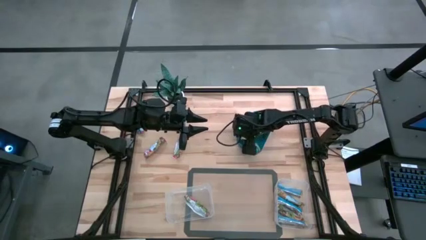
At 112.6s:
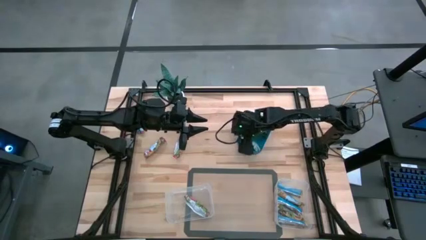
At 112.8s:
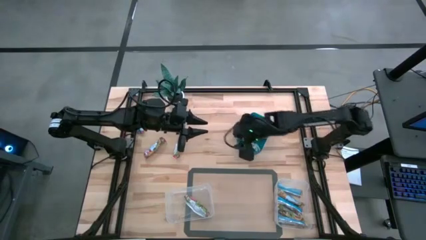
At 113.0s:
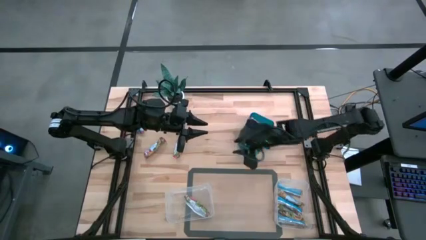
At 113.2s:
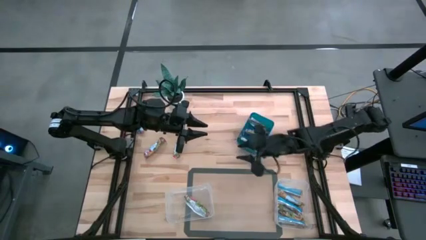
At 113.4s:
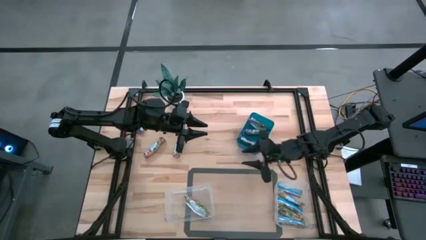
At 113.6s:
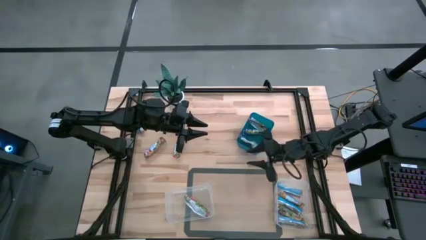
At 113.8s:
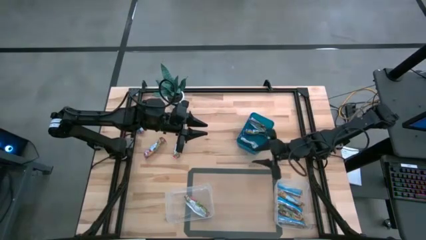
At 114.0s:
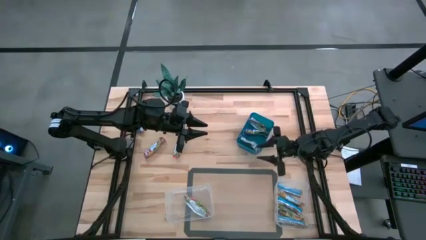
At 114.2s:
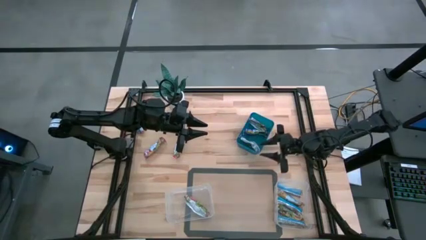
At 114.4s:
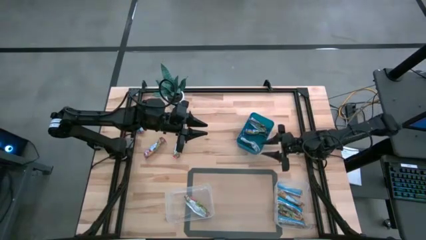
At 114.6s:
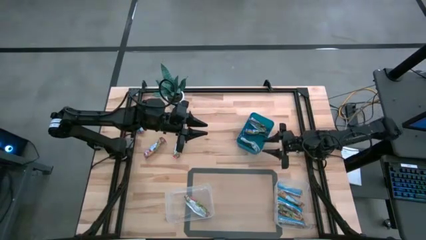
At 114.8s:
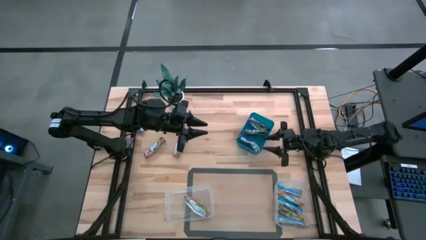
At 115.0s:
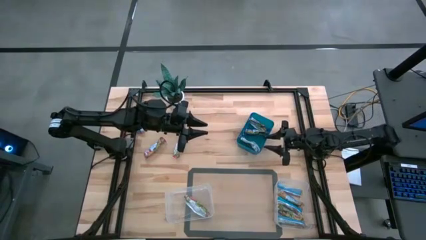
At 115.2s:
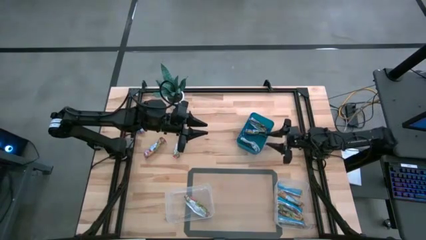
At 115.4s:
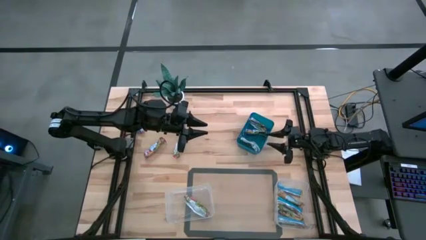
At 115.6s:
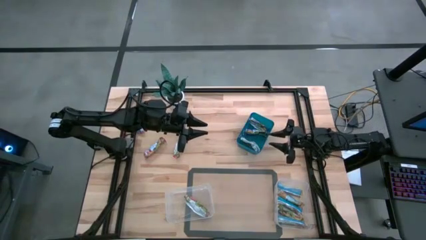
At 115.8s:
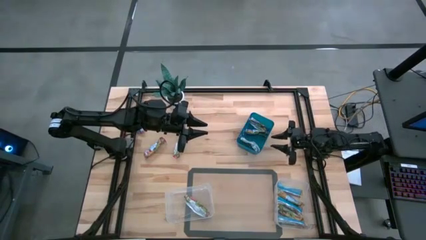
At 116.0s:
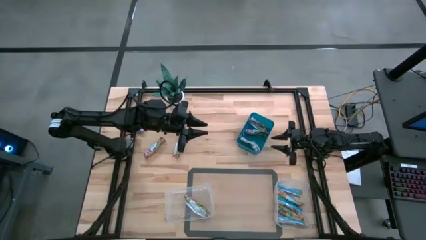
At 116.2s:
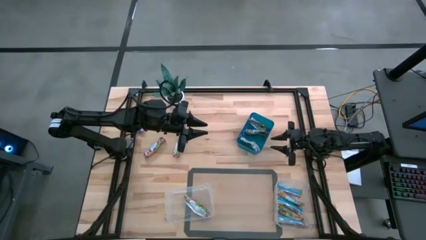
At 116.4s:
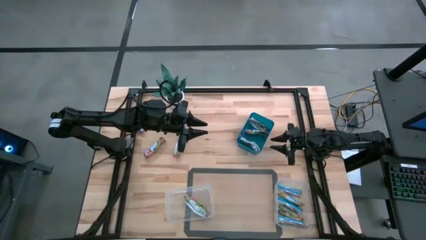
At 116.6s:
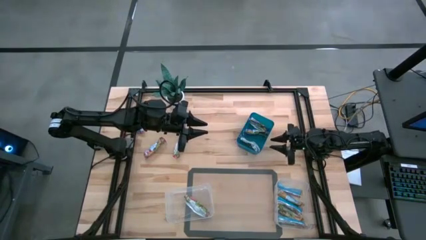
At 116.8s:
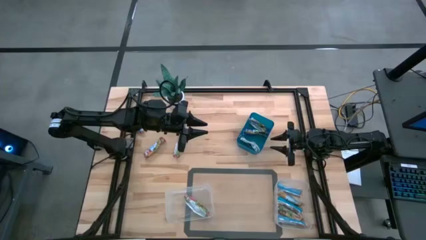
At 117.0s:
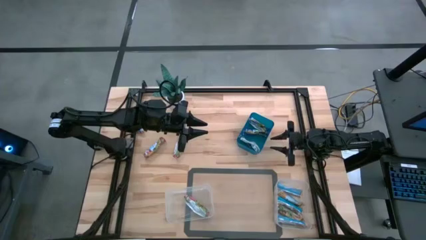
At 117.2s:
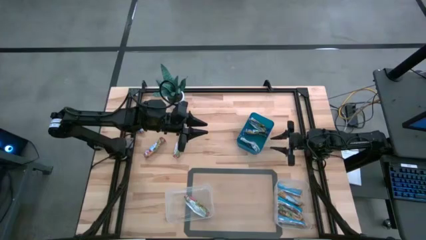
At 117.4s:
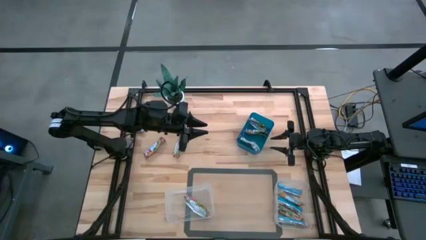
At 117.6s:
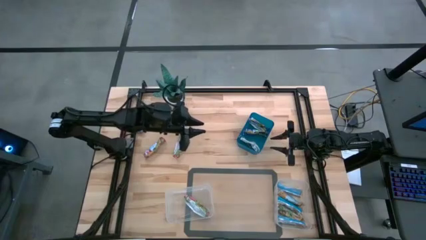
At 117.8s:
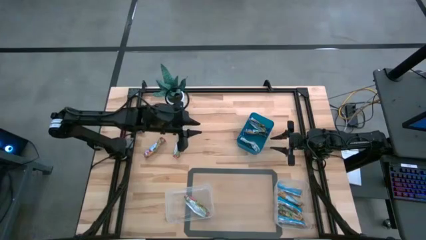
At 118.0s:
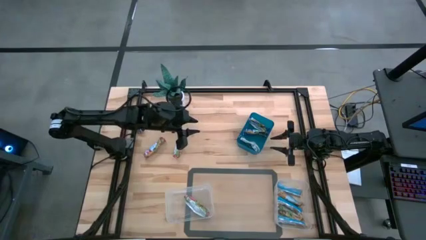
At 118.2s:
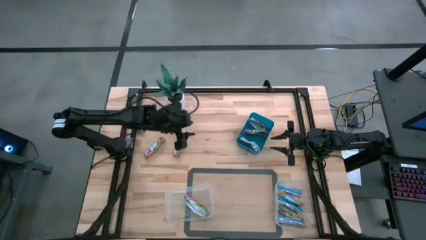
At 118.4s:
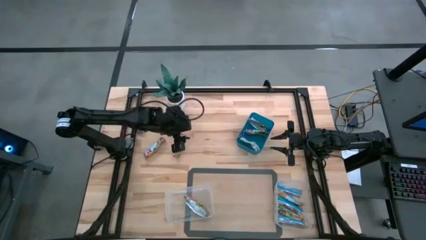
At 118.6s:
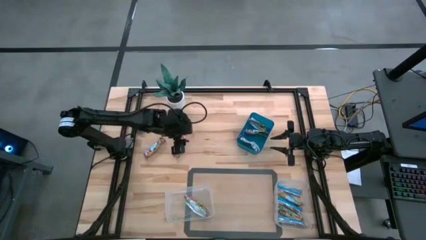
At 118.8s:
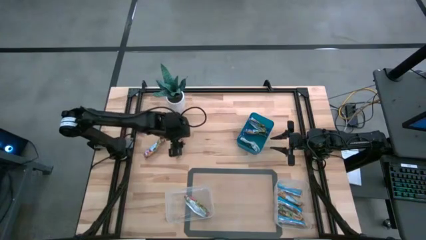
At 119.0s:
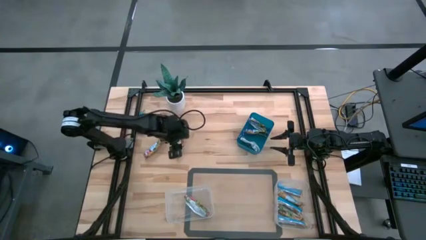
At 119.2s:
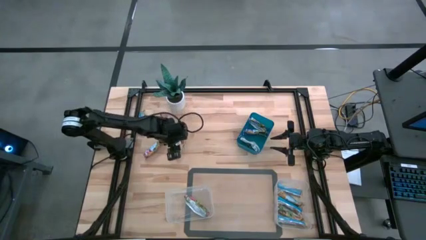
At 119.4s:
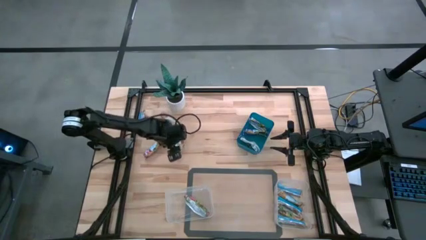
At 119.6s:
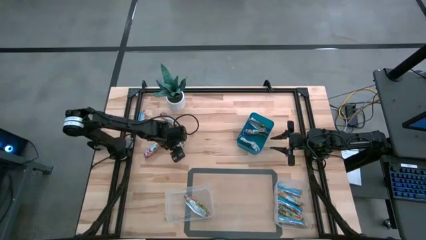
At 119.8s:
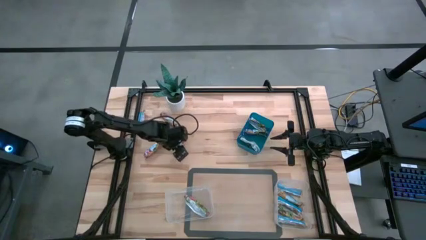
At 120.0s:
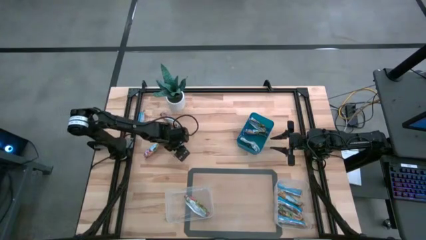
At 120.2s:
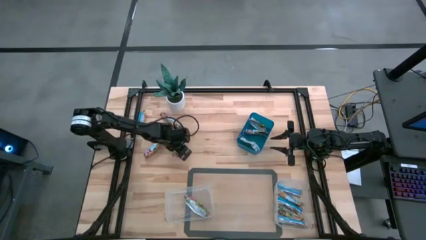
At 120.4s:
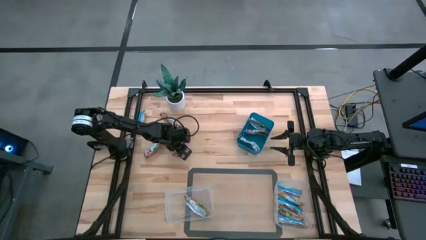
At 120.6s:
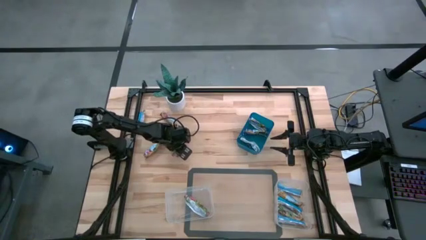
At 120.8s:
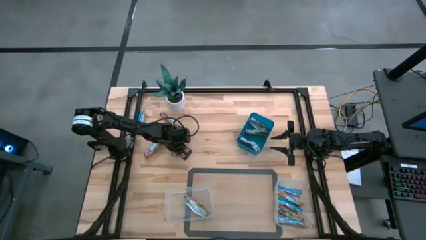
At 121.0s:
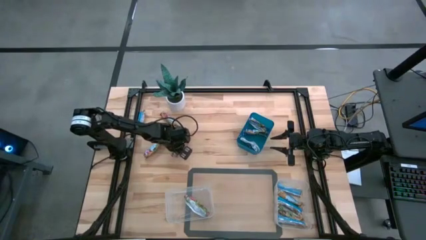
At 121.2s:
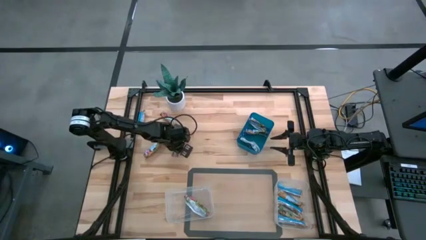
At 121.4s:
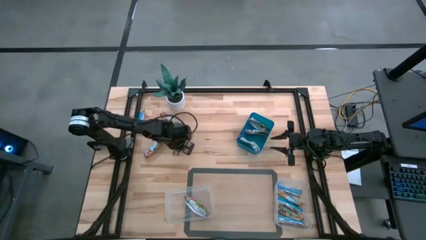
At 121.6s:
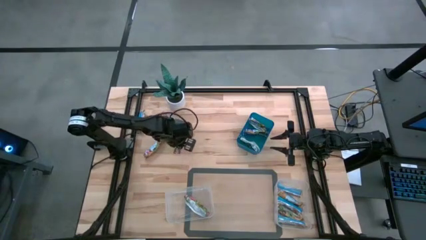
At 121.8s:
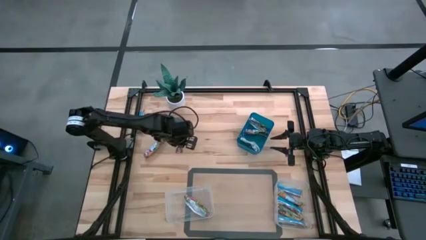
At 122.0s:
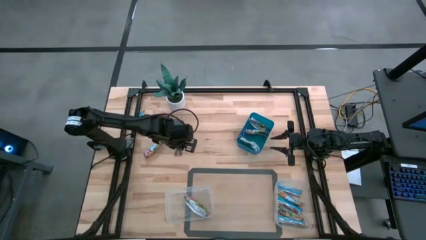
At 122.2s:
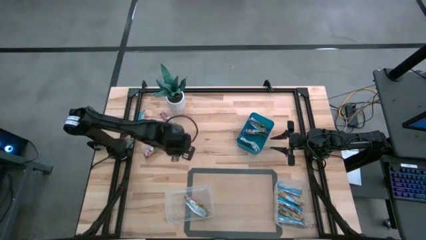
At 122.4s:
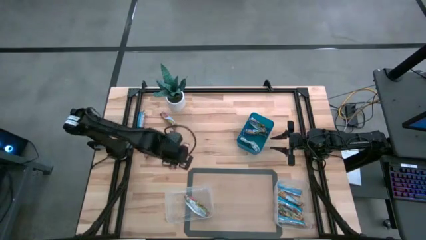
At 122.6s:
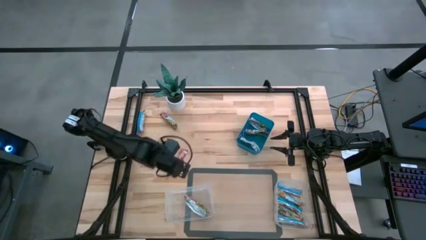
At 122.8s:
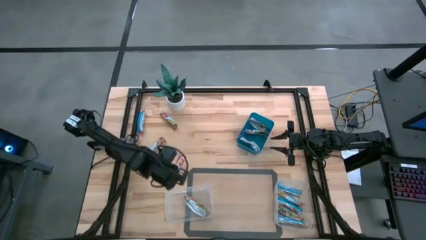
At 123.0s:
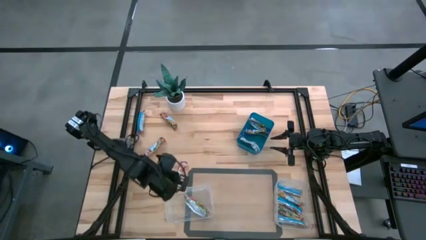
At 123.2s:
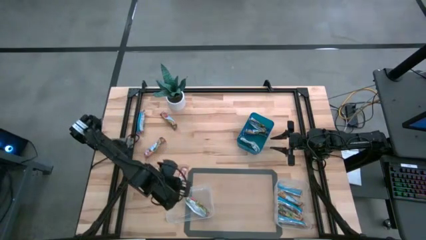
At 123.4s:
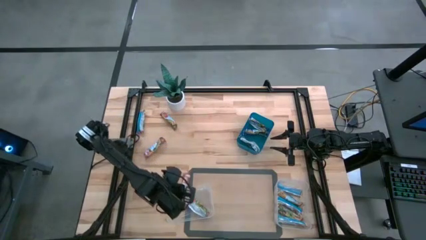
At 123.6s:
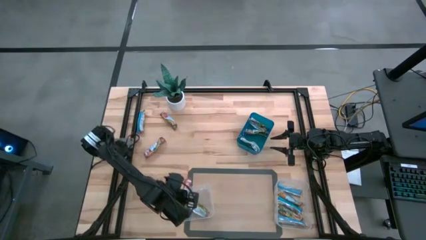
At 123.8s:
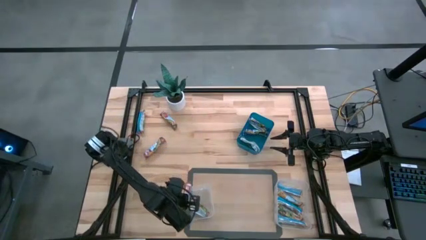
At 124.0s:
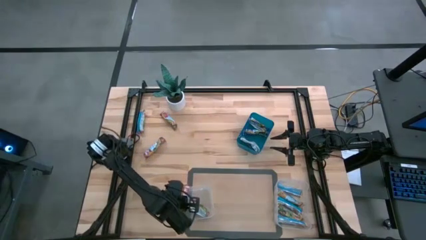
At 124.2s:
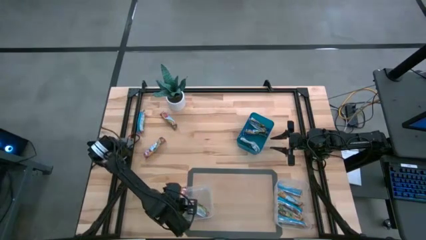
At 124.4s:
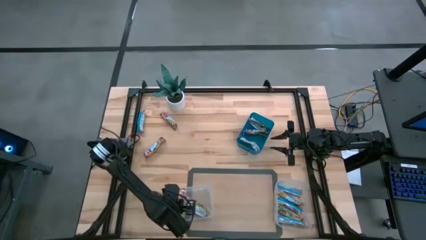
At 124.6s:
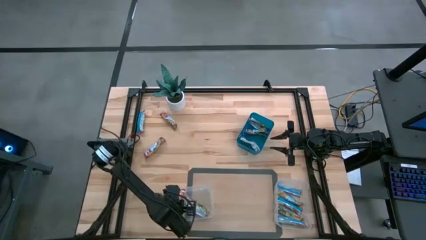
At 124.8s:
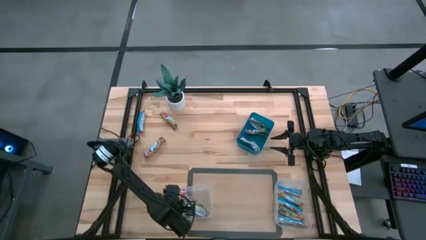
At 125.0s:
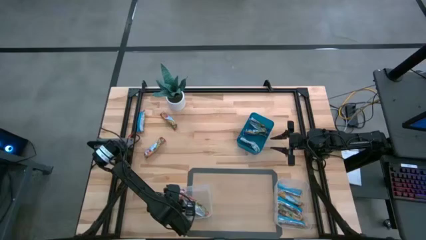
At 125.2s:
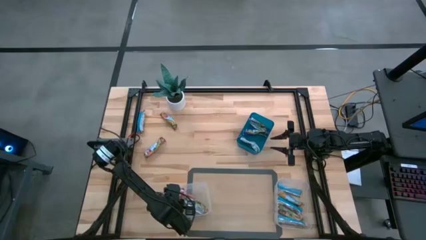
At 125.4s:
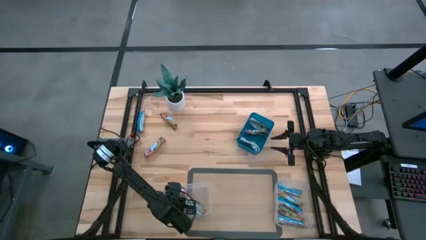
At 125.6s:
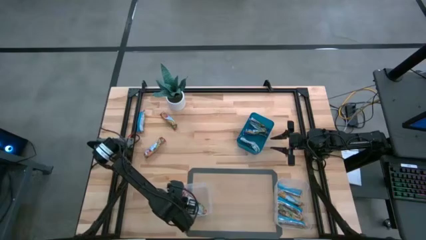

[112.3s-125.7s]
Task: Pick and place Granola Bars by type
Put the red granola bar into the left transparent bin

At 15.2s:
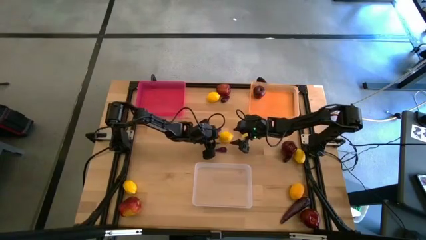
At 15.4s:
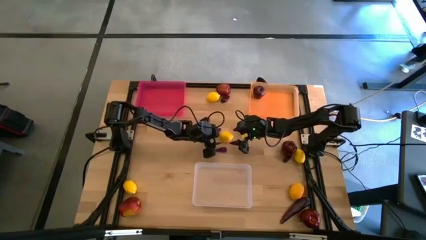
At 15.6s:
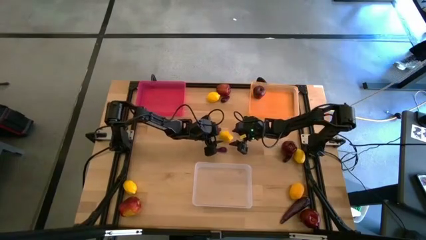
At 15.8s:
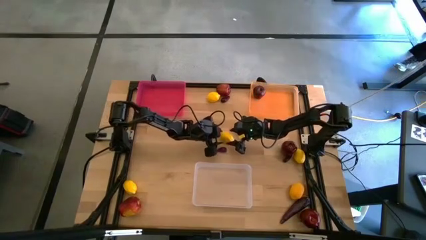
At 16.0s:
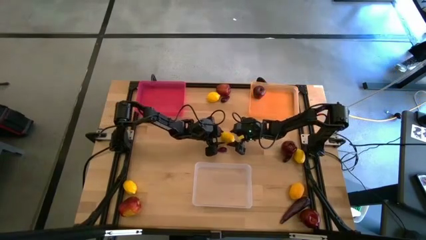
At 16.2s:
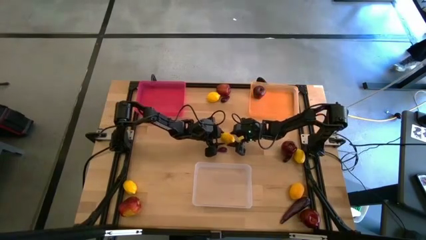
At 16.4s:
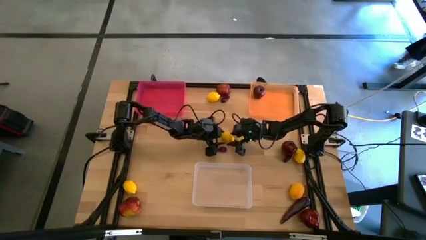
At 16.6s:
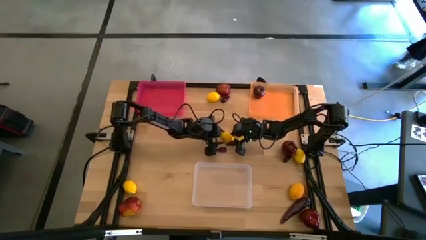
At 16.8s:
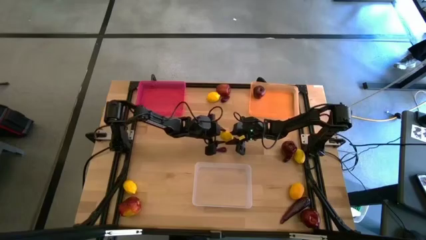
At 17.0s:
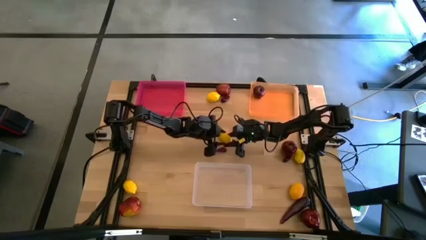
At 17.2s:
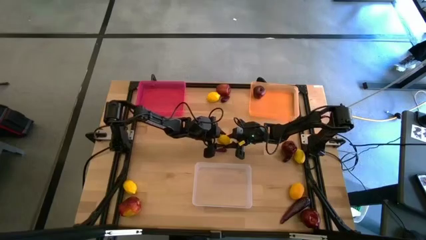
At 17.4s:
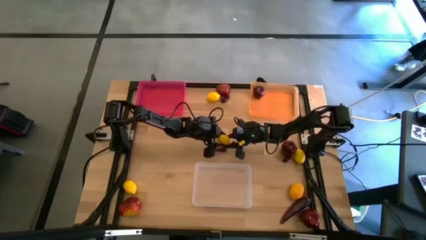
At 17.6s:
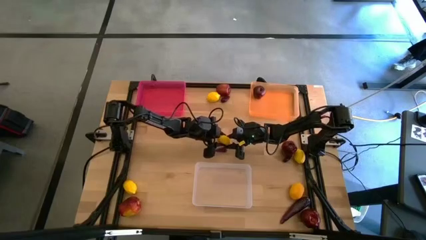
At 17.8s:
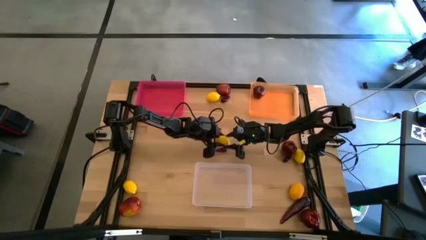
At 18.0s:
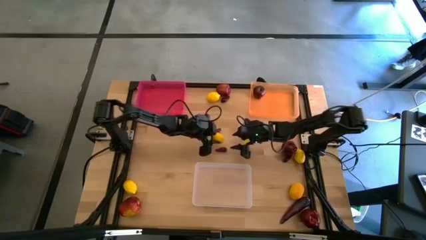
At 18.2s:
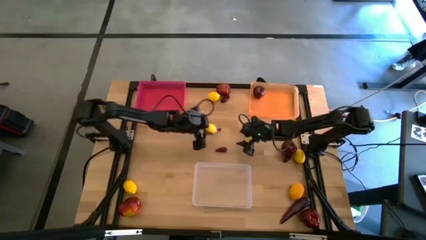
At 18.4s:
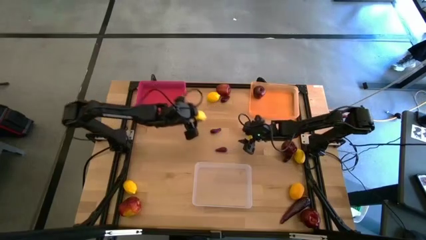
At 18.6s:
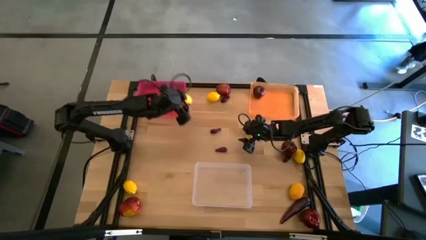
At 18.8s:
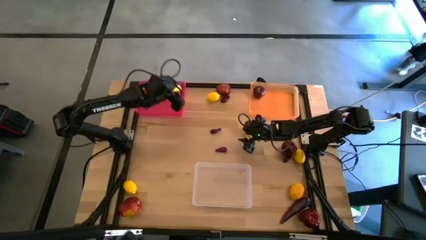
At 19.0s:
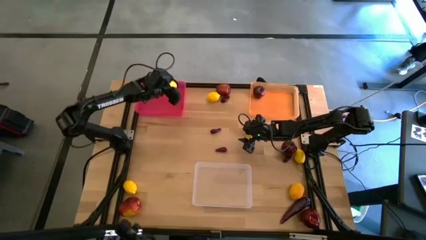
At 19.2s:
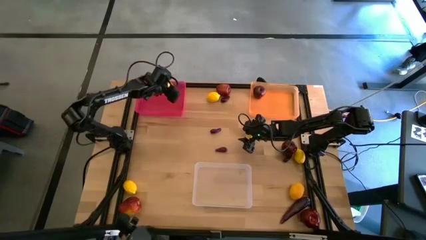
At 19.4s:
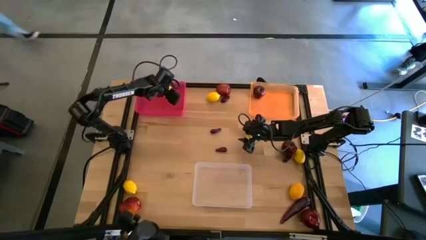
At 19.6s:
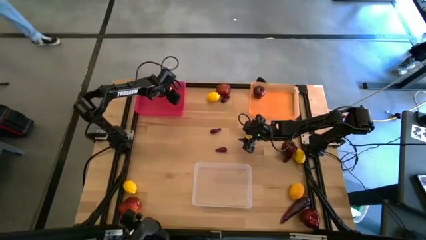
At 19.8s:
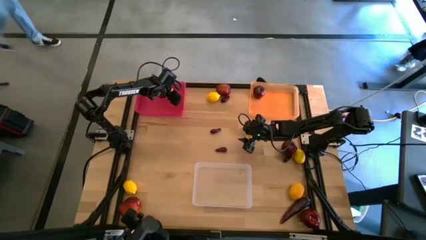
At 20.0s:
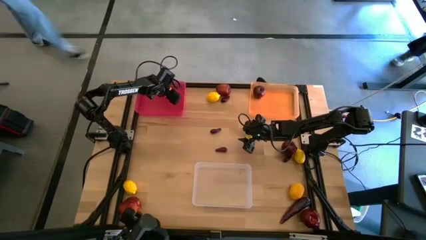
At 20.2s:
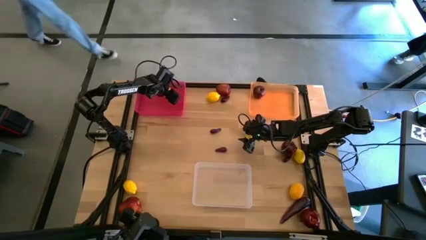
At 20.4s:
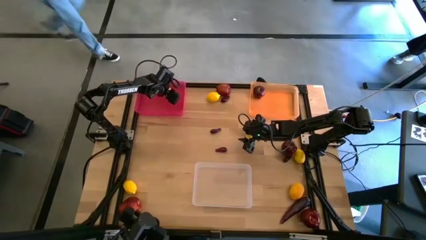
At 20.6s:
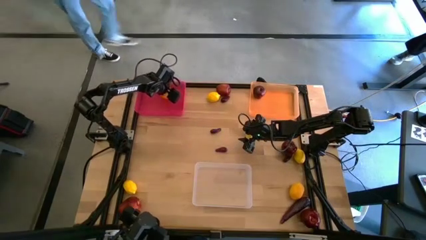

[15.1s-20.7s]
Task: Sort produce into baskets
Put the lemon into the red bin
